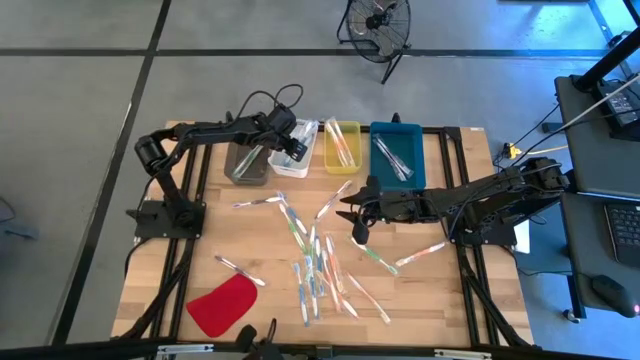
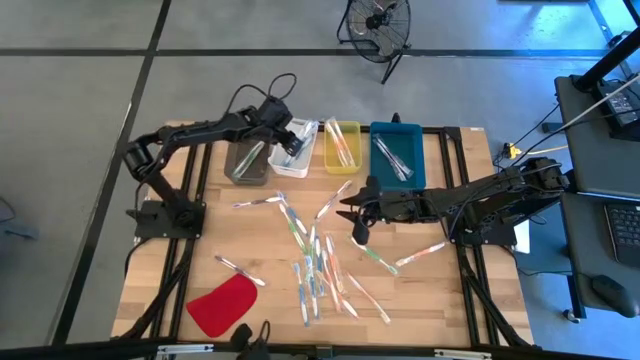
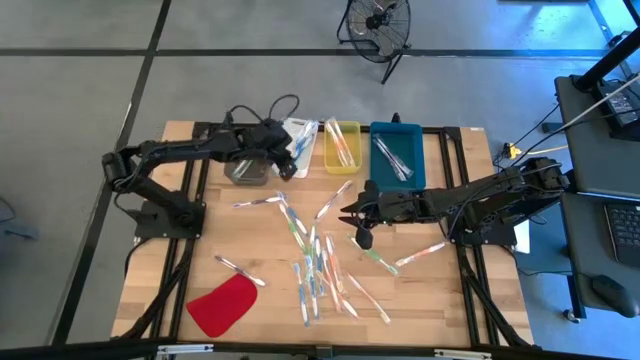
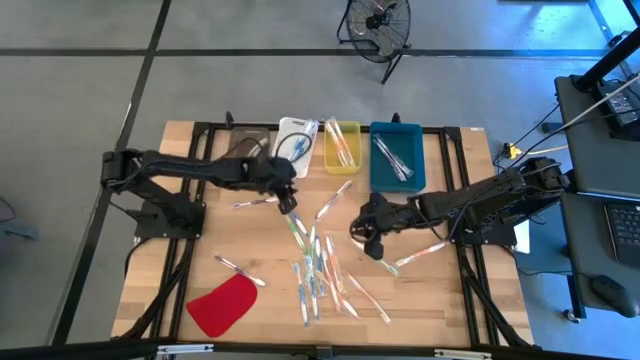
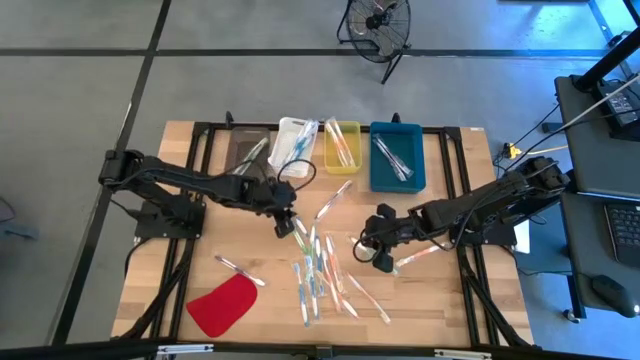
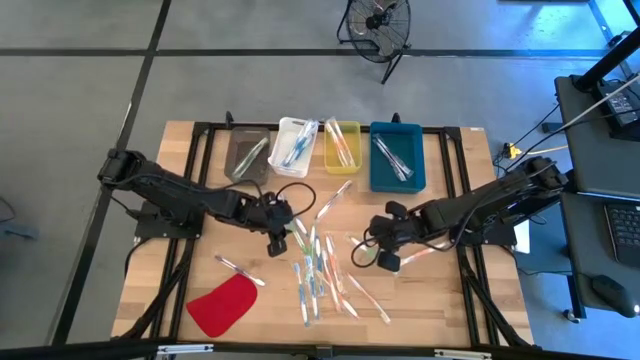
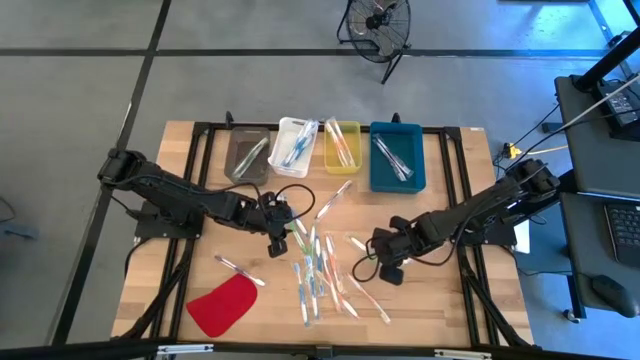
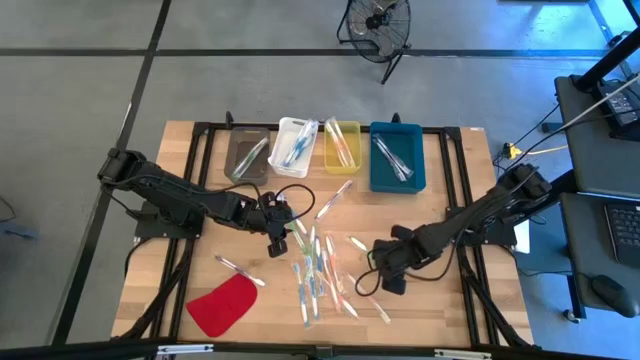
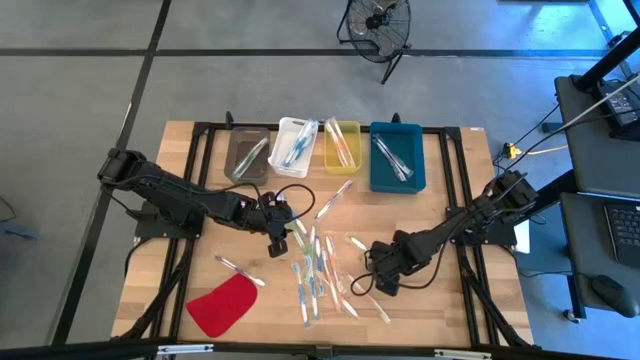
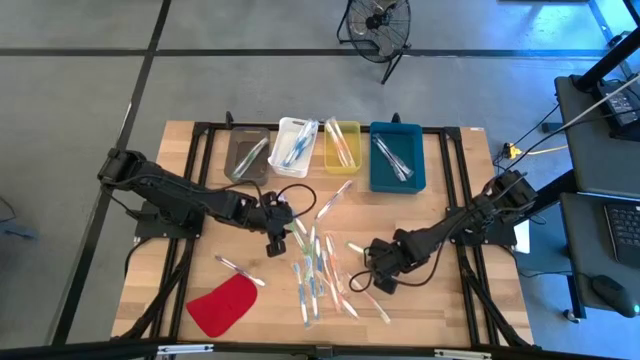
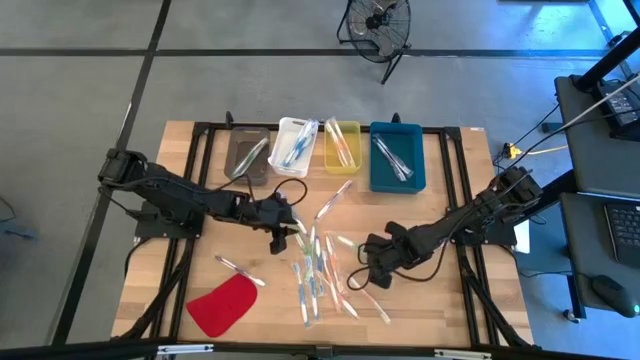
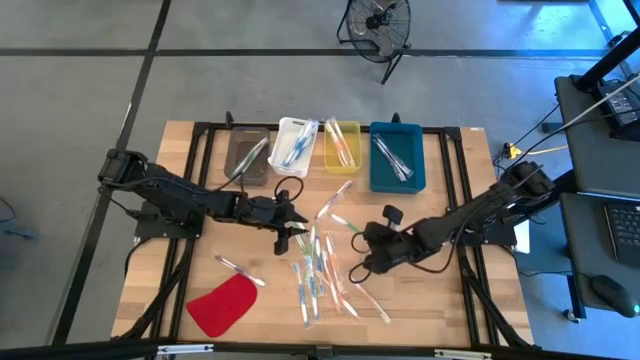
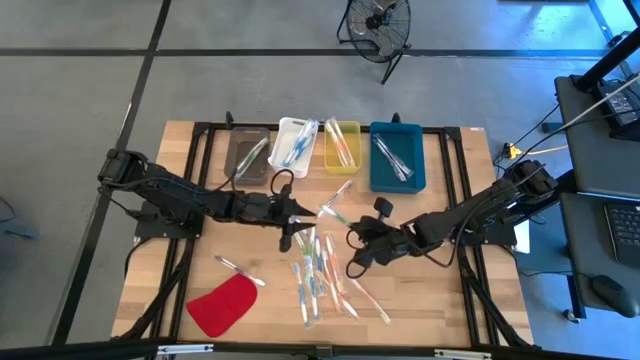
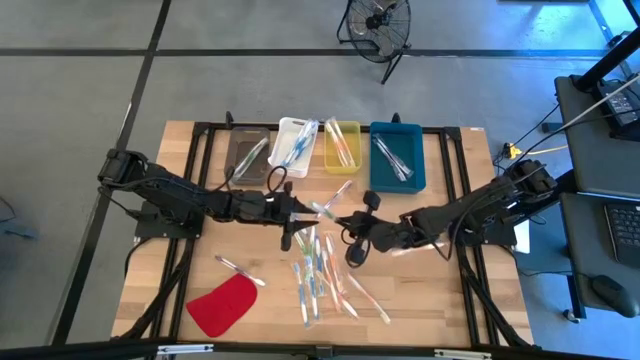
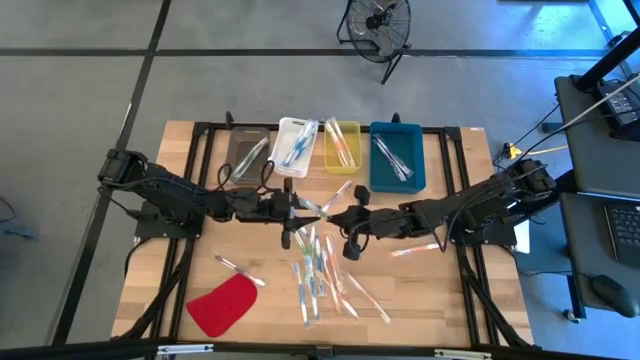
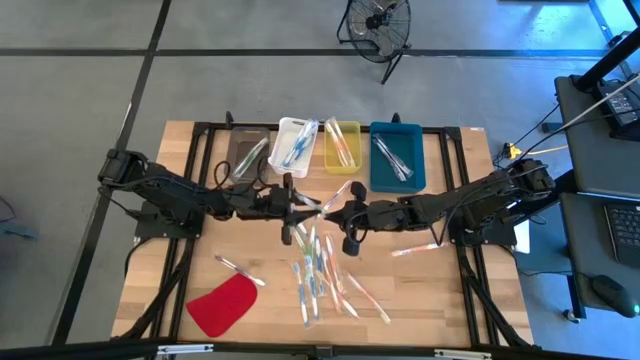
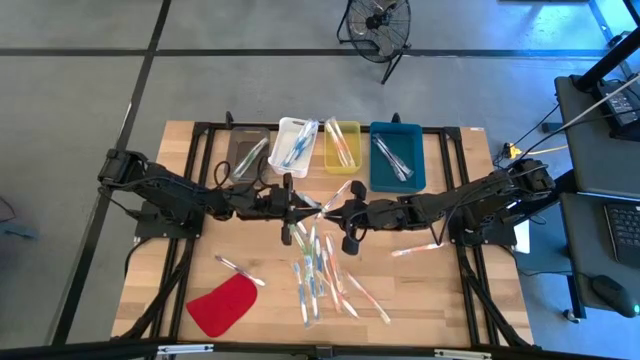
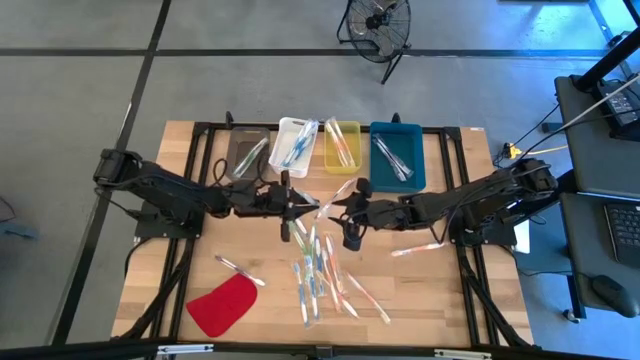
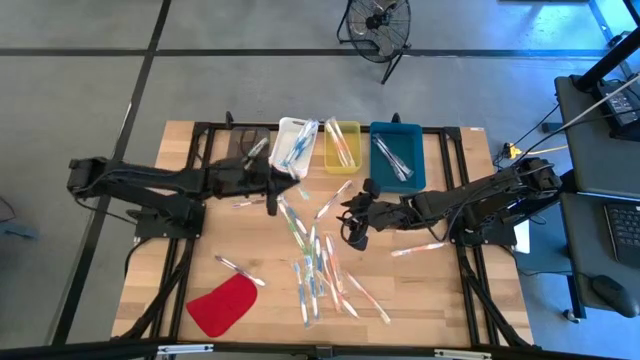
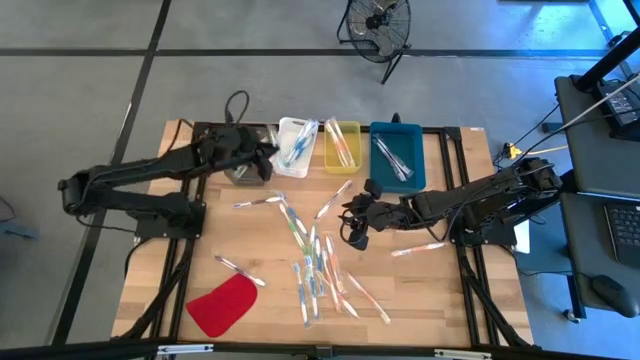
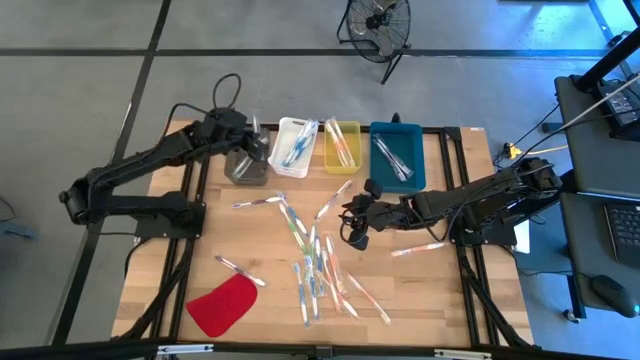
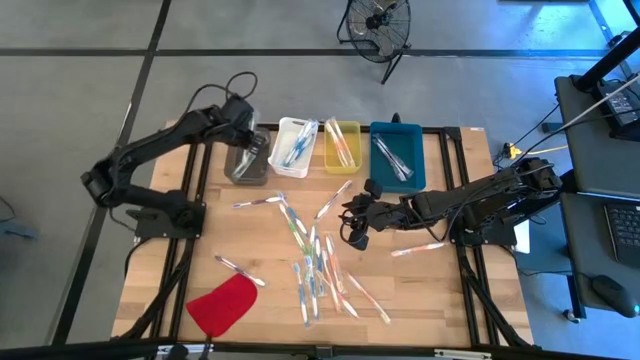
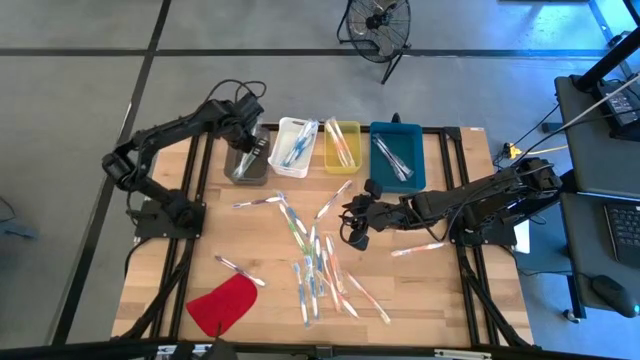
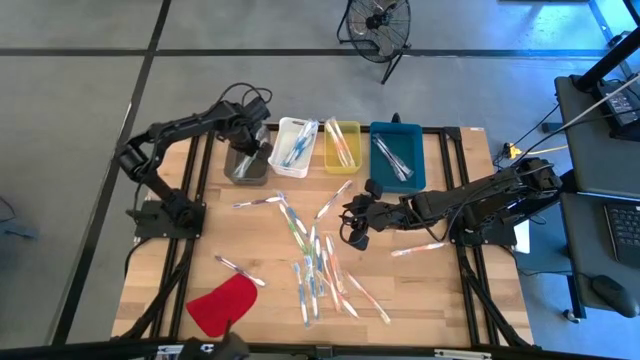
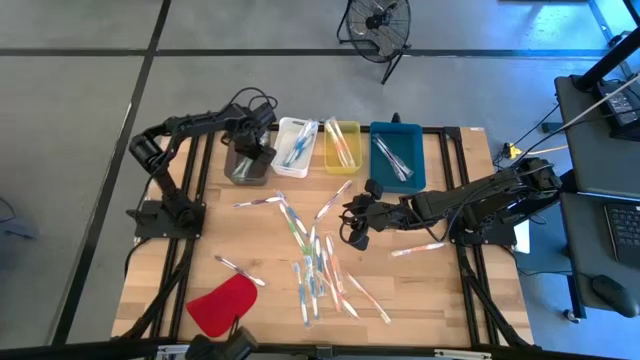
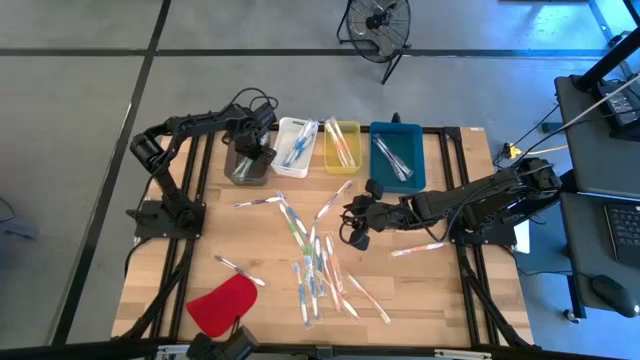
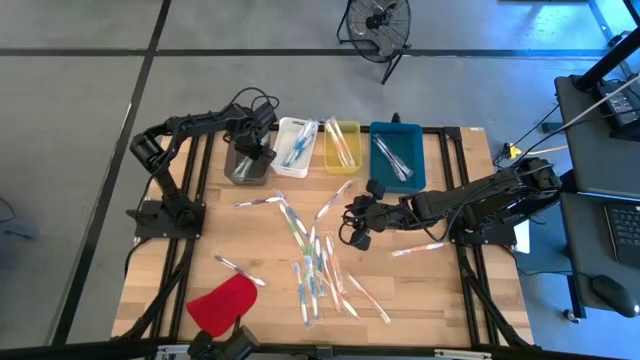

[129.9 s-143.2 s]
Task: Pick & Place Toothbrushes
Put the green toothbrush into the black bin

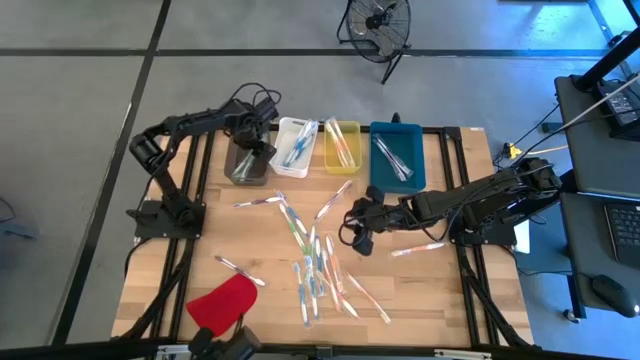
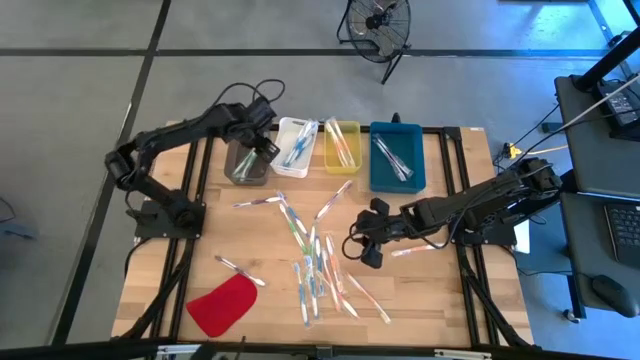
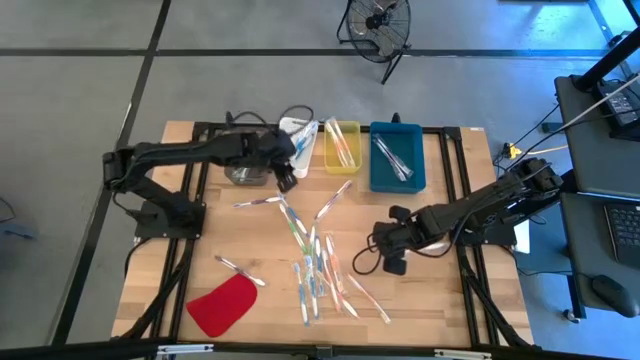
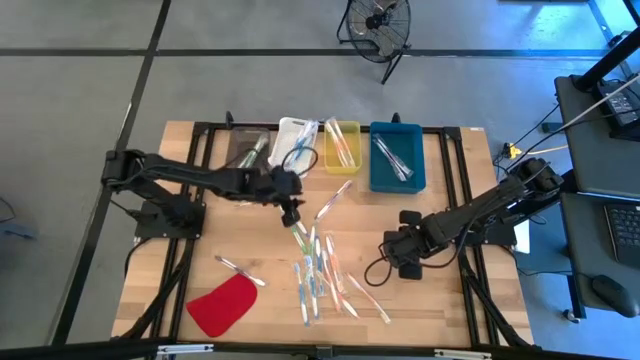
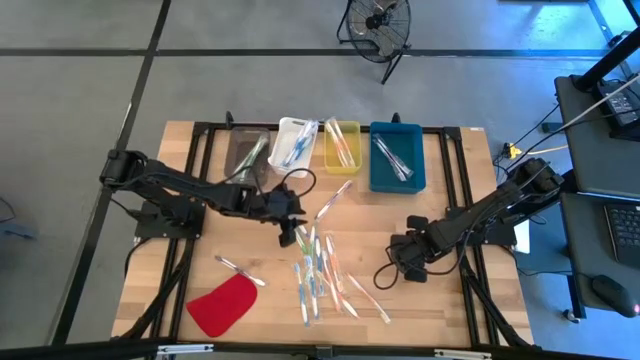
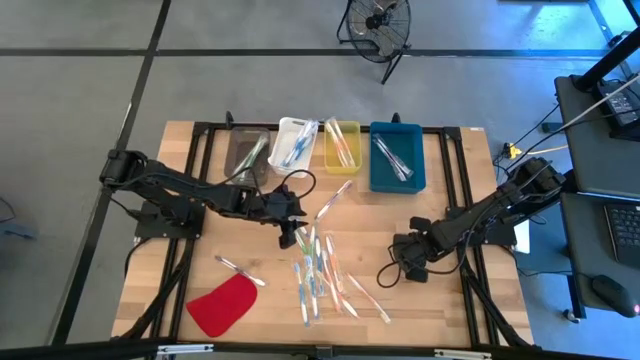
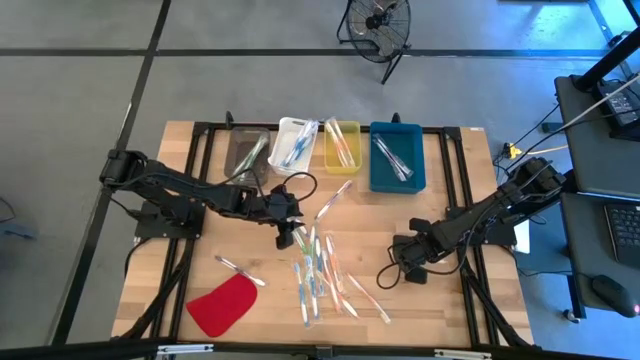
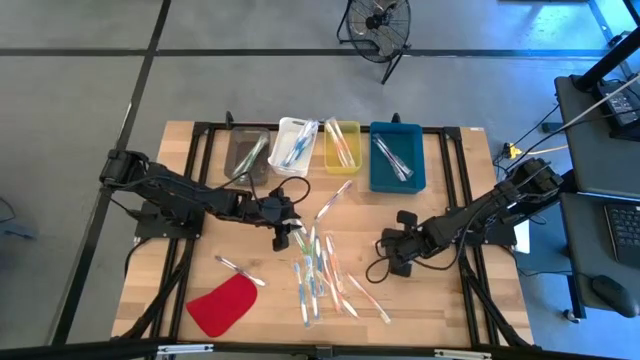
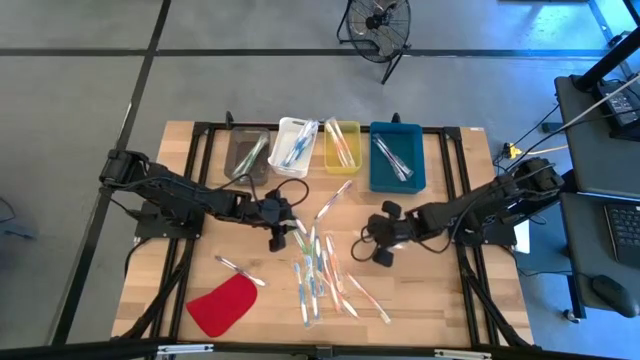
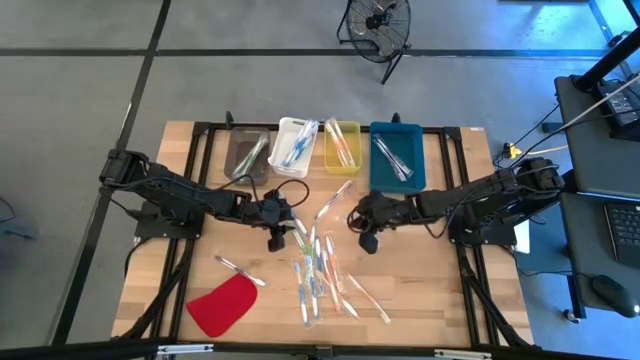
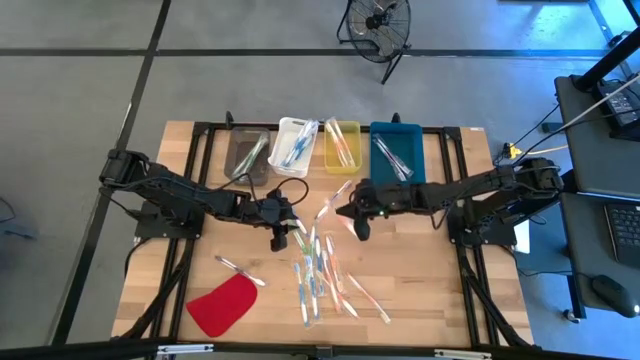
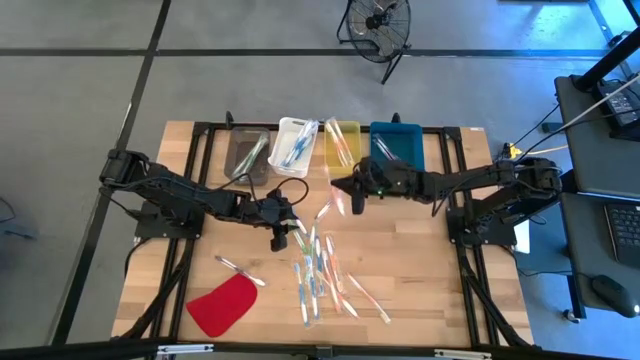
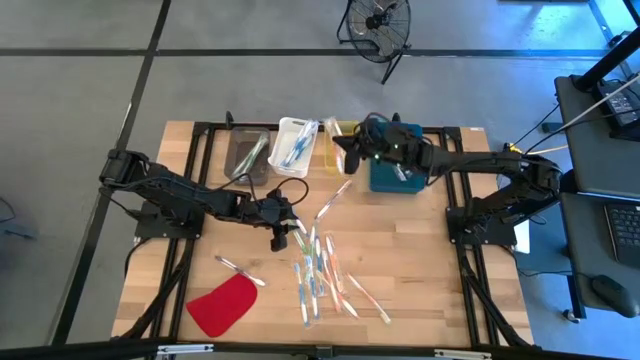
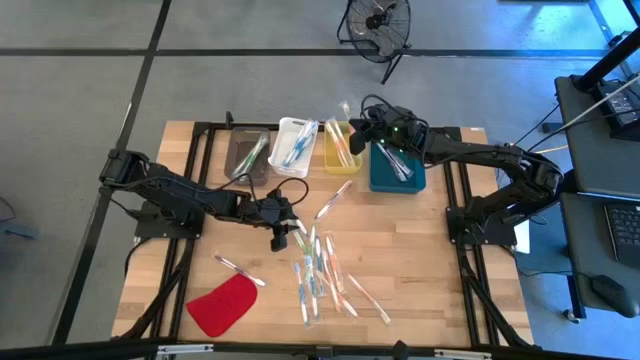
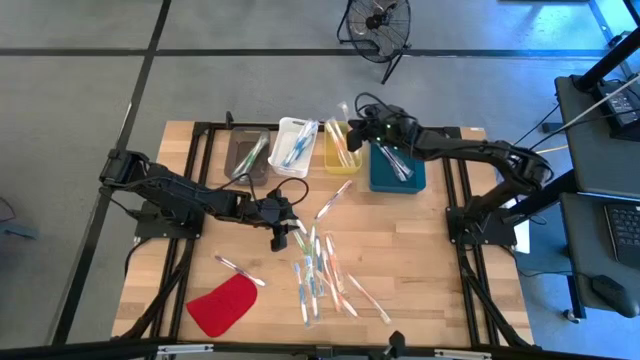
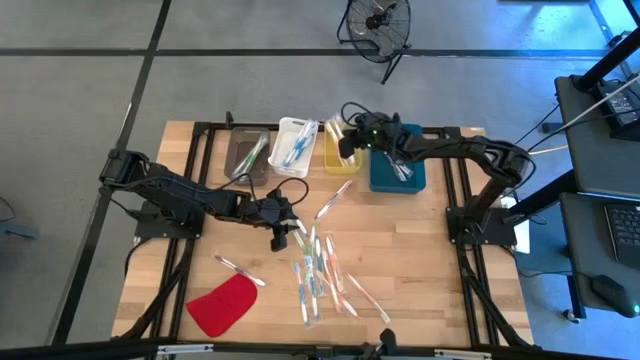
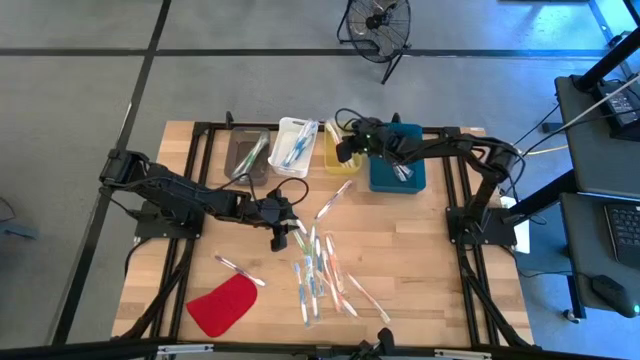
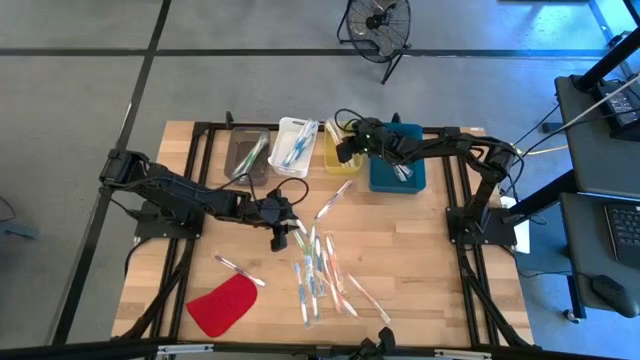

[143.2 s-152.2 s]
Put the orange toothbrush into the yellow bin
